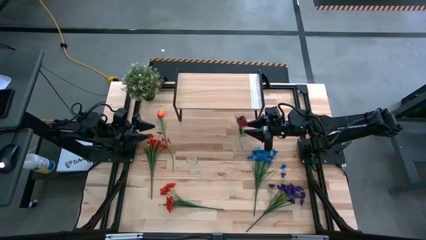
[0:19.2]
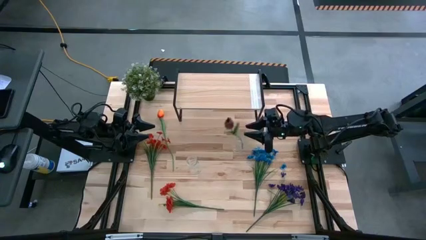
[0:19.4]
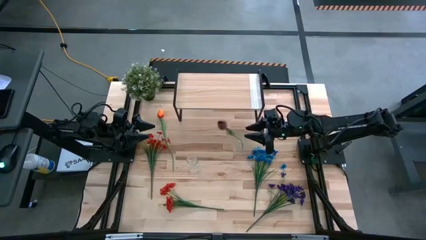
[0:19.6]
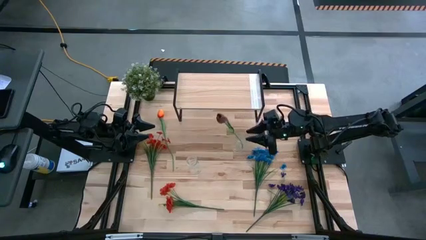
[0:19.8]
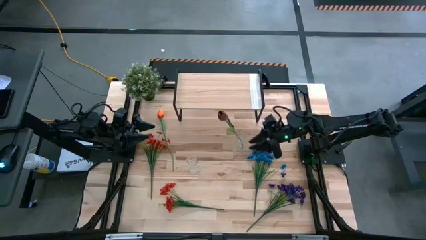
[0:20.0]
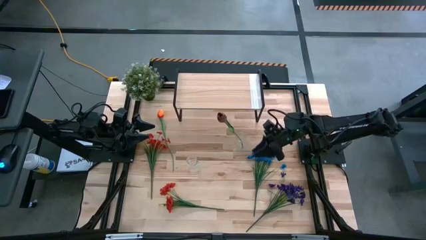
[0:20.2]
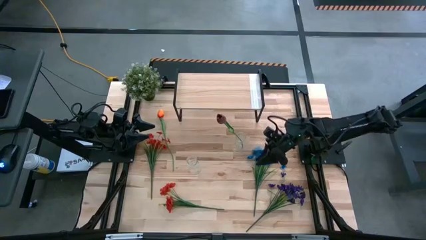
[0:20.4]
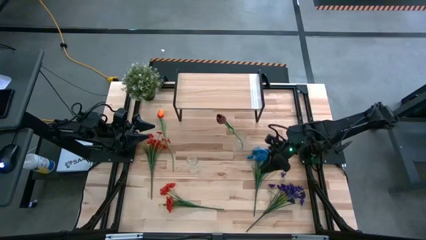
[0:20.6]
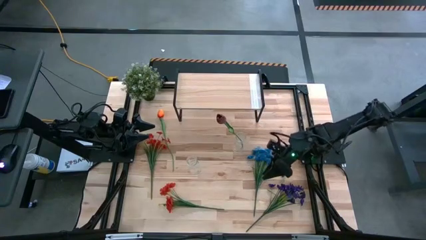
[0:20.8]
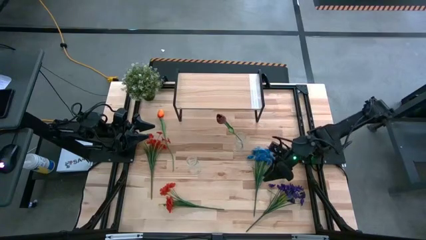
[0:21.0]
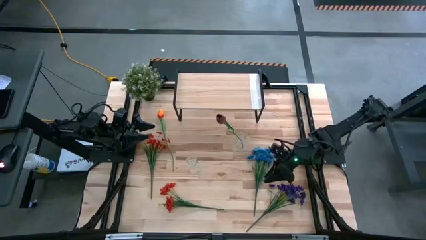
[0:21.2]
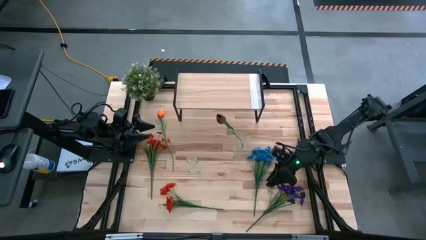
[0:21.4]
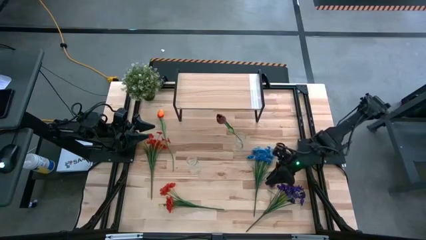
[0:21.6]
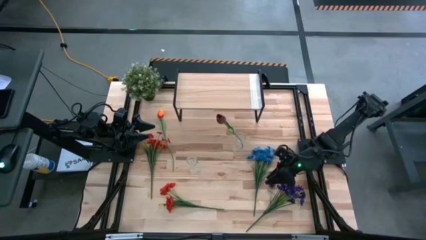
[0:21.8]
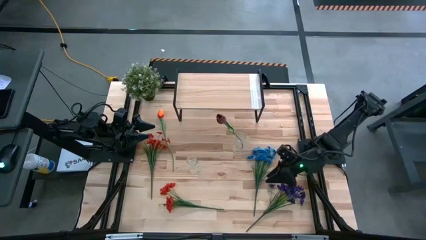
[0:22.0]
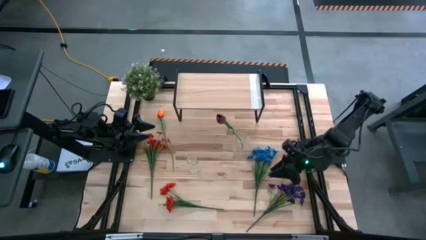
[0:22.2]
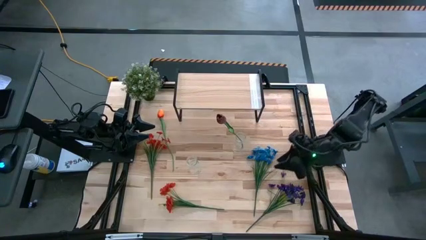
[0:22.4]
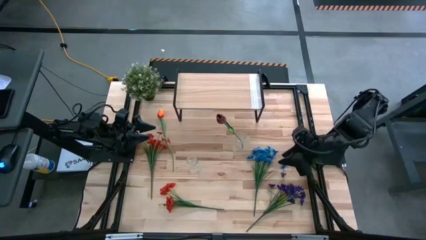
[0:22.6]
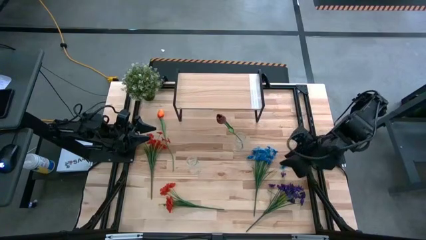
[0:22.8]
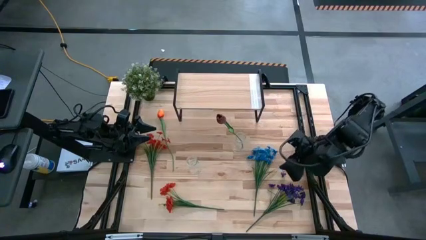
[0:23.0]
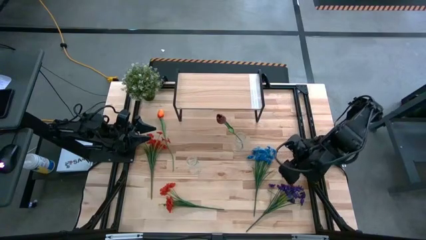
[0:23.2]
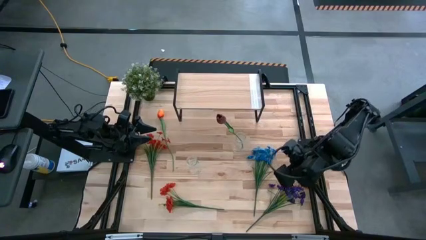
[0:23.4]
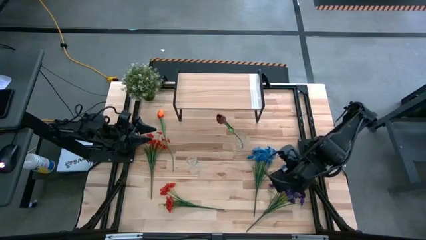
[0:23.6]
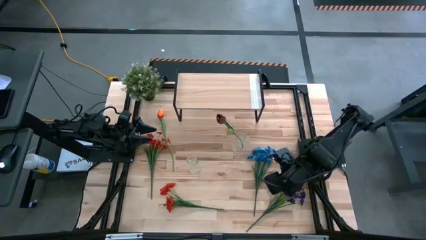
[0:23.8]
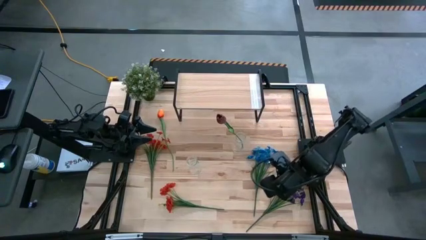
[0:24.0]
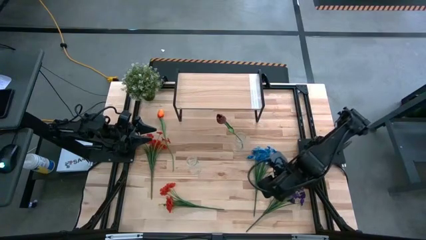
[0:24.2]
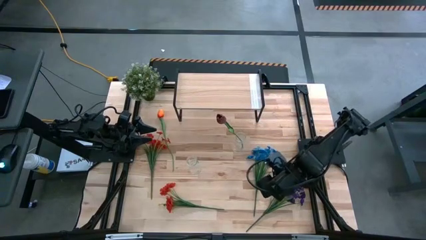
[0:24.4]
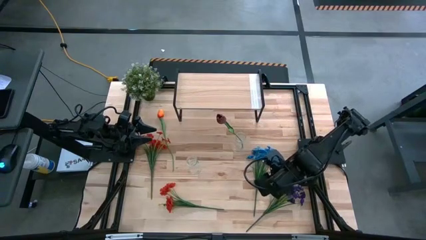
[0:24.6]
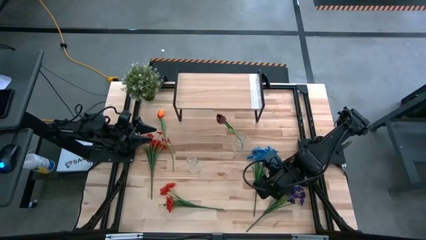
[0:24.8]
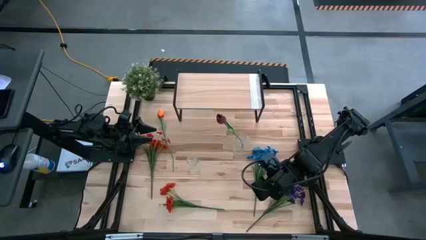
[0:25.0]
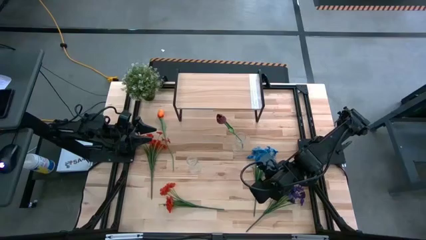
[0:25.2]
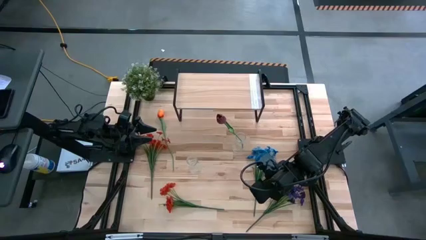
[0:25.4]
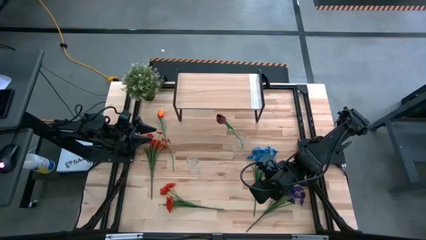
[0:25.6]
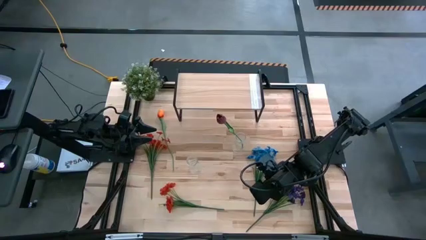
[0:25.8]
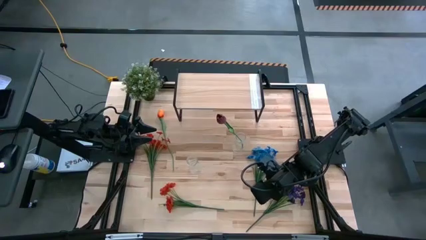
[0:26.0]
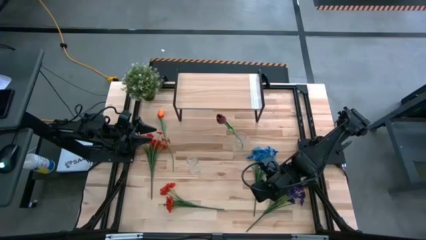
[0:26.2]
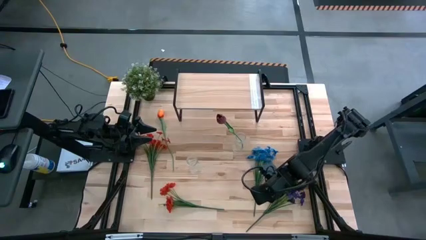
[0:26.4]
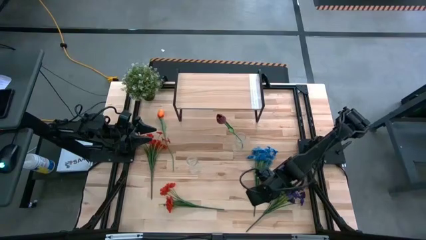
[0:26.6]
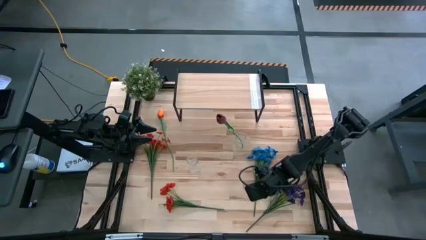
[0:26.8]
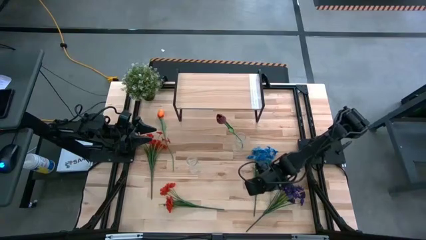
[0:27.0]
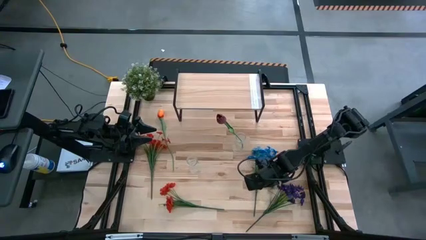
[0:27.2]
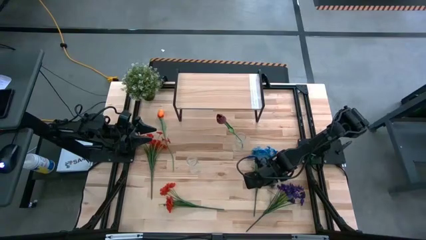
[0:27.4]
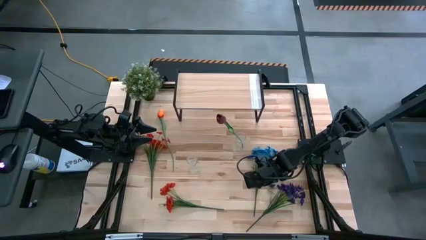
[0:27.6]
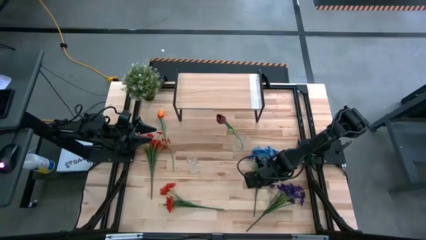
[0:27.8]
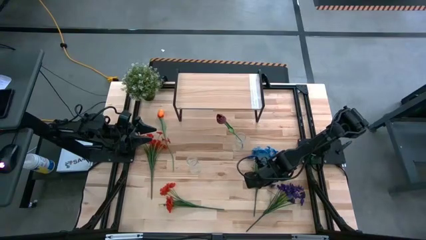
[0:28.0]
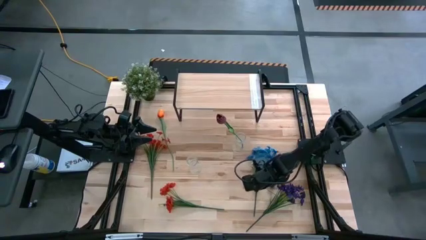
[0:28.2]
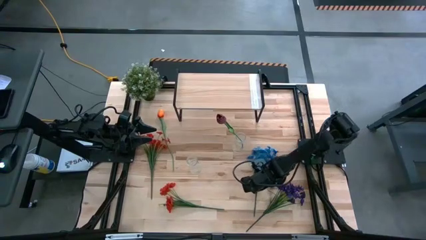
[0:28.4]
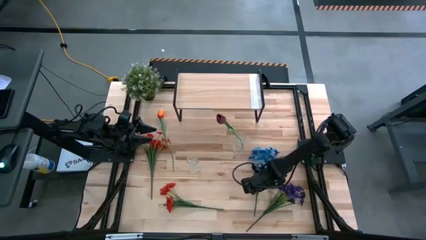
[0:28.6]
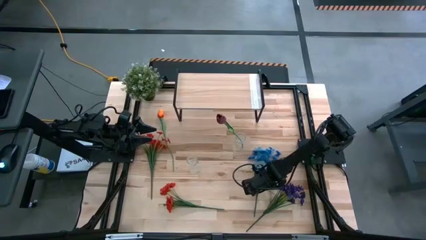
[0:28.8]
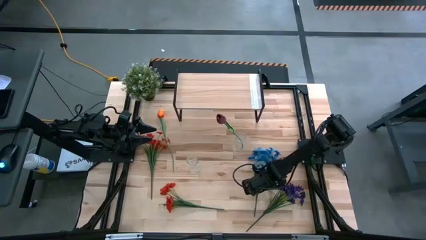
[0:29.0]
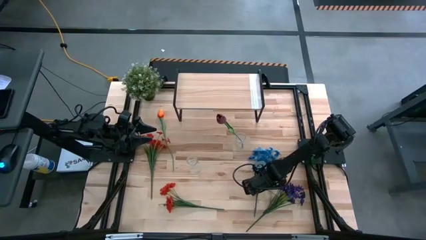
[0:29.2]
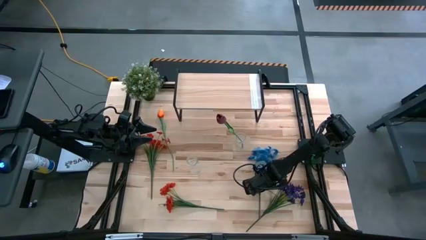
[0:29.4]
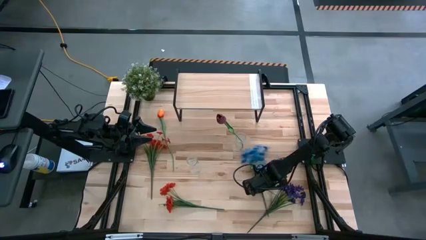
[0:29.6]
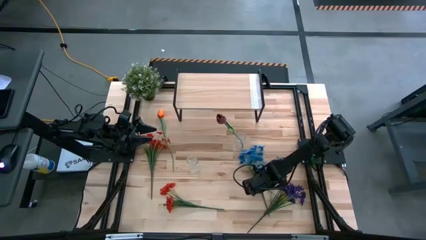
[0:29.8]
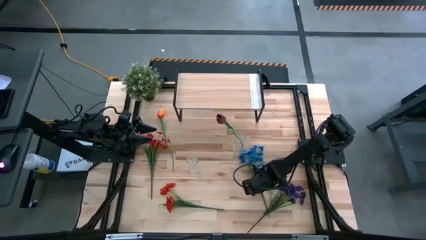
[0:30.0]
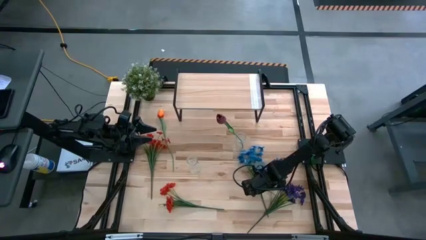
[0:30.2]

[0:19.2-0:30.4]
Task: Pick and place flowers into a vace then onto a shelf
Put the blue flower into the right transparent vase

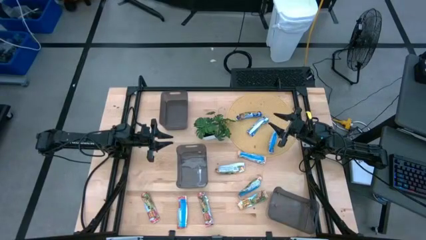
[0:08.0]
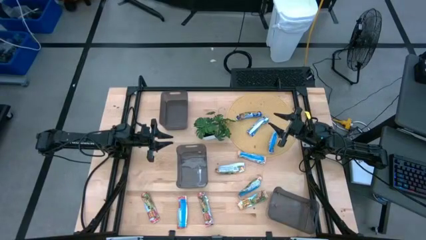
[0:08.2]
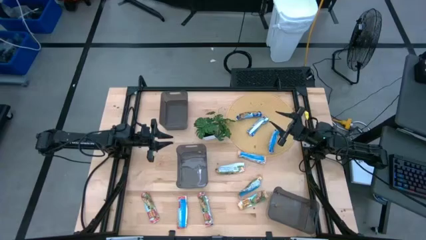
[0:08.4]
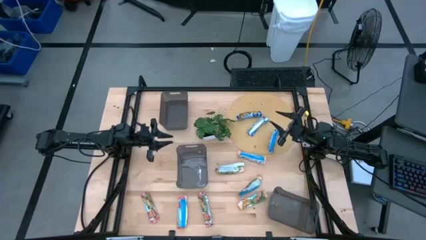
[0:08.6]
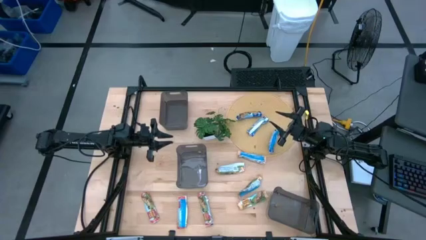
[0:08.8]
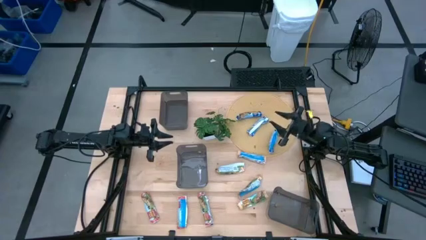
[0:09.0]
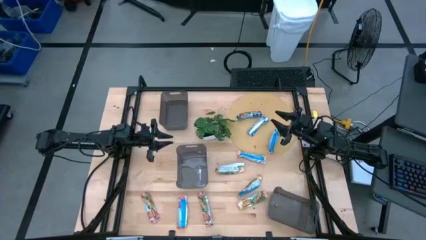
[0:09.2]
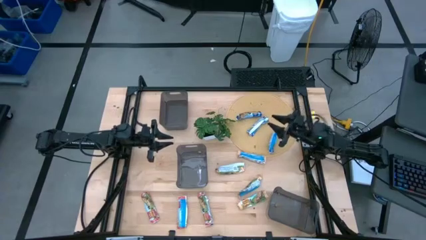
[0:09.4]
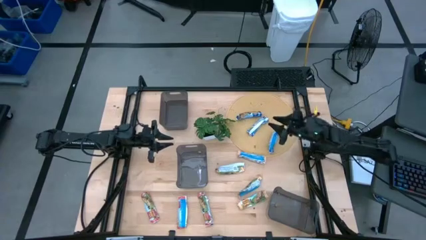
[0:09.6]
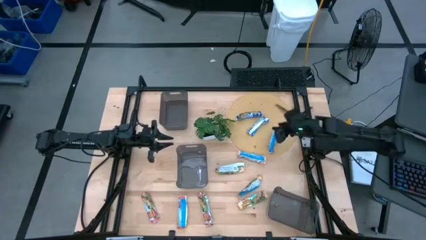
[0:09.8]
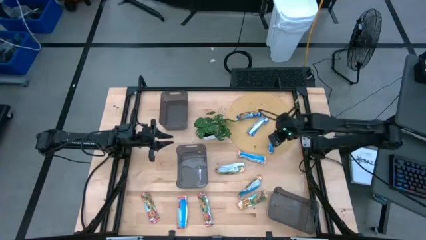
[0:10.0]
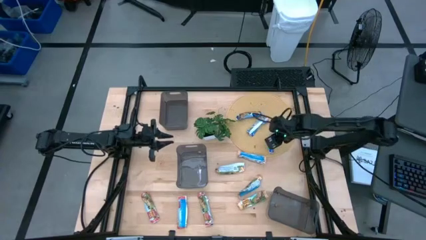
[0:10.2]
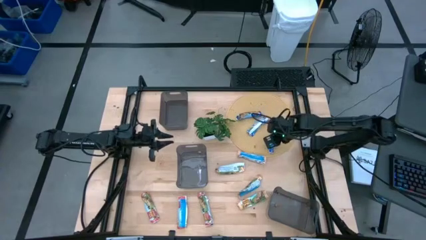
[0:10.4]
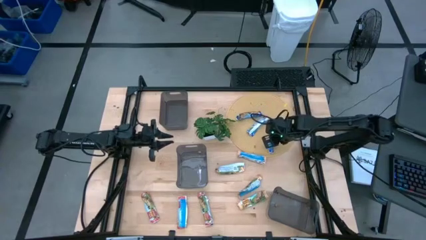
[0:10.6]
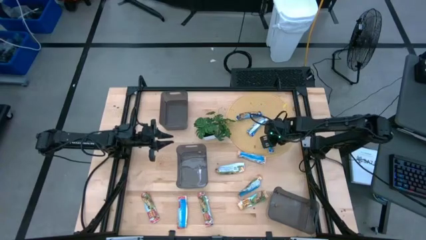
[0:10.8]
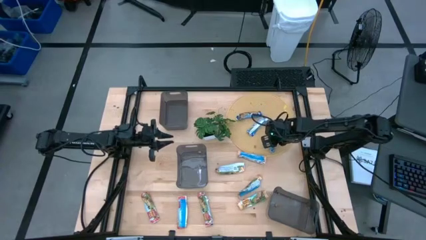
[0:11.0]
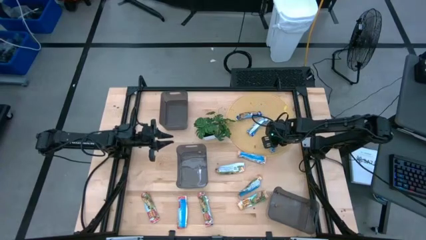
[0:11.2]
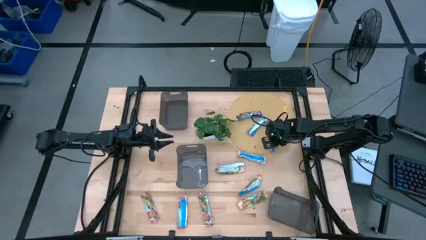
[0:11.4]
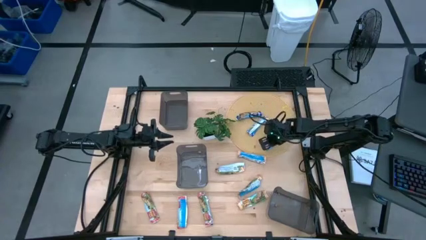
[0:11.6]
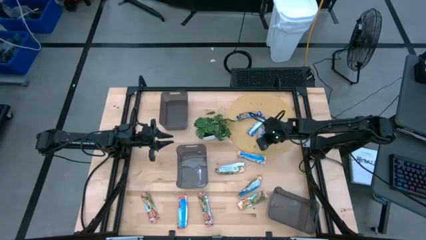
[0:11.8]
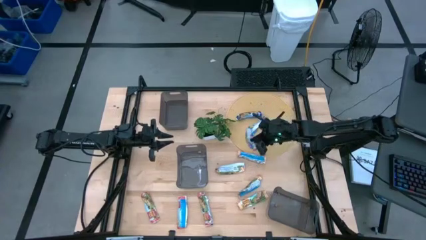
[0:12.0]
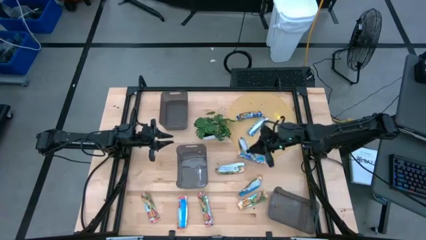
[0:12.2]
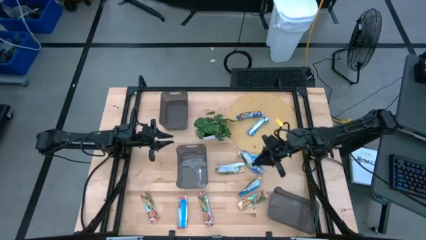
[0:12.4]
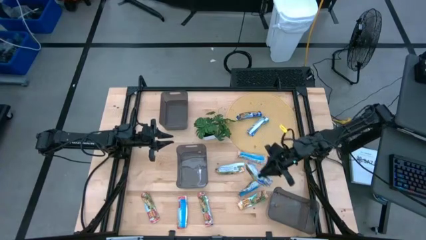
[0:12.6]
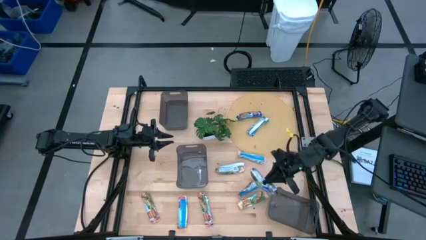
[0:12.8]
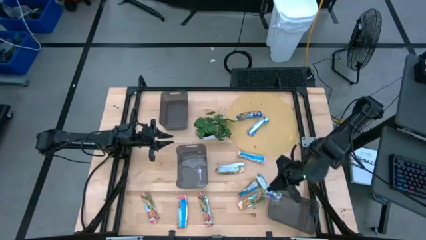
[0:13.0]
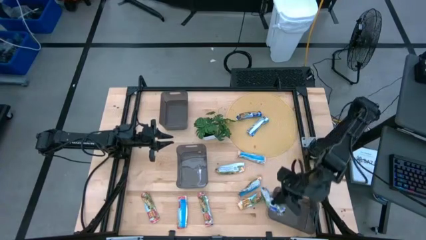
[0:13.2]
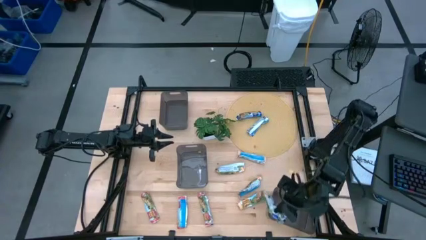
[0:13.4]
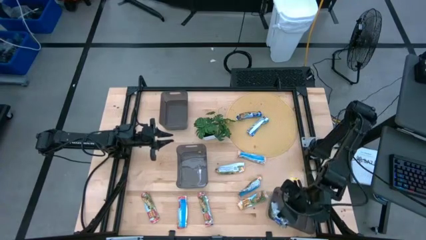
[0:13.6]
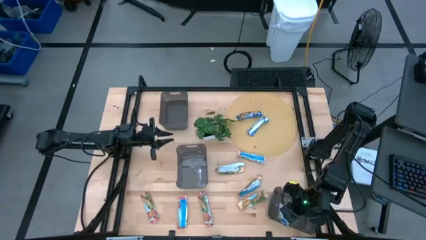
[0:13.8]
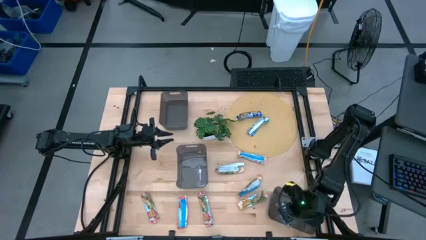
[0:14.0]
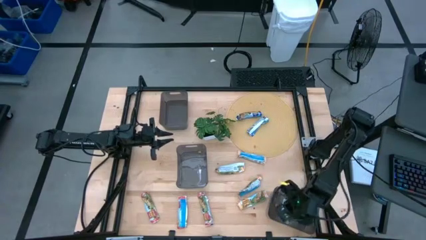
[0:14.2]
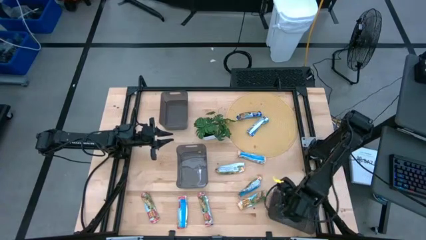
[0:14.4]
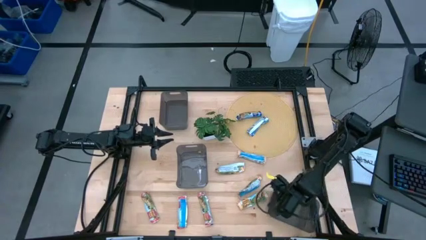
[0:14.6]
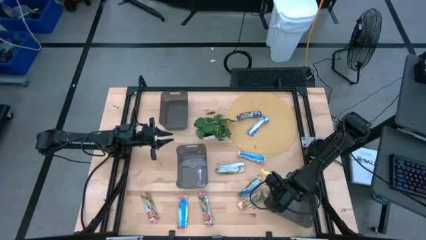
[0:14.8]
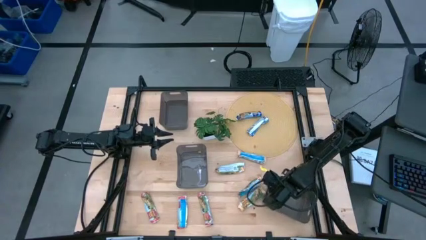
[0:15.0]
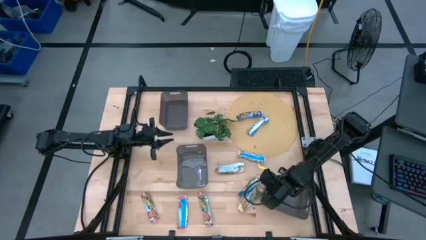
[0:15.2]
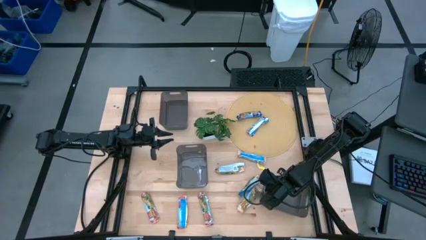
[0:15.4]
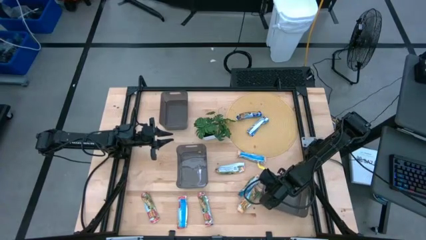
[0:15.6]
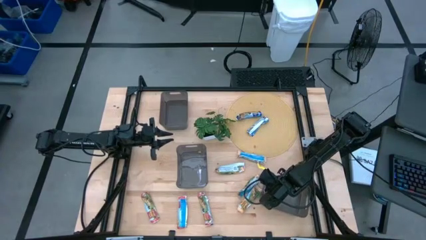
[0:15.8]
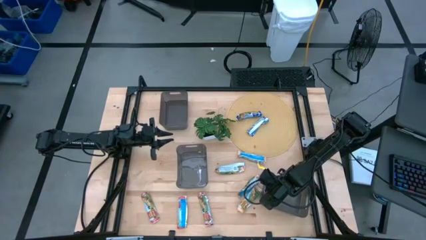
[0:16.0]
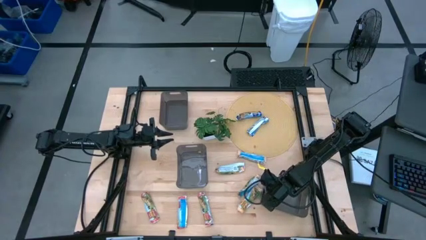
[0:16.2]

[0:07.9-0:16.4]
Task: Pick and place Granola Bars by type
Put the bottom right blue granola bar into the bottom right black bin
